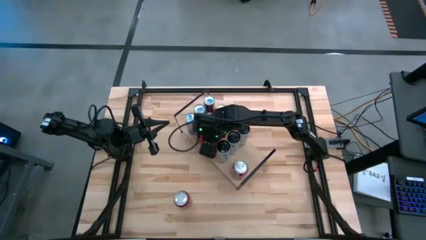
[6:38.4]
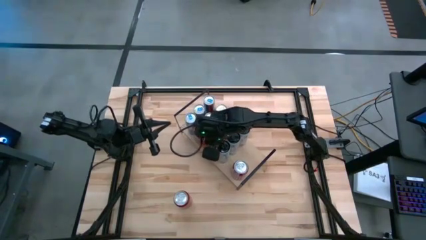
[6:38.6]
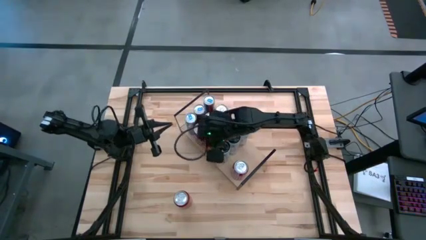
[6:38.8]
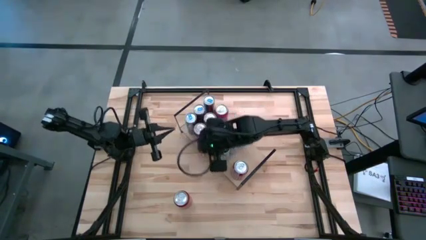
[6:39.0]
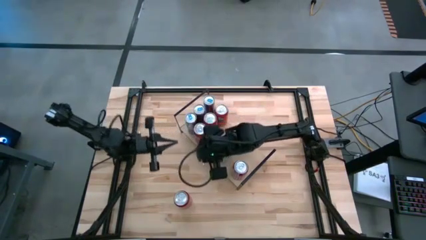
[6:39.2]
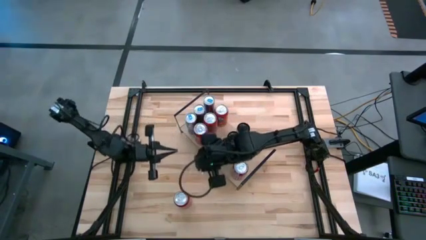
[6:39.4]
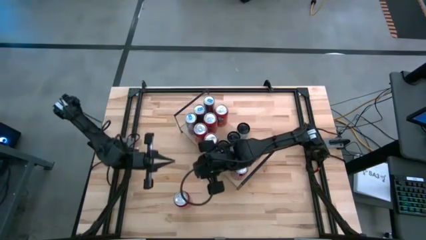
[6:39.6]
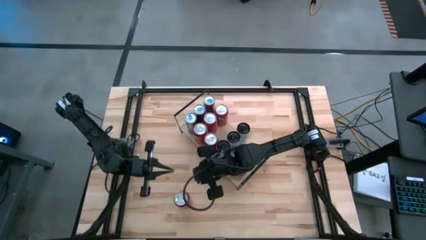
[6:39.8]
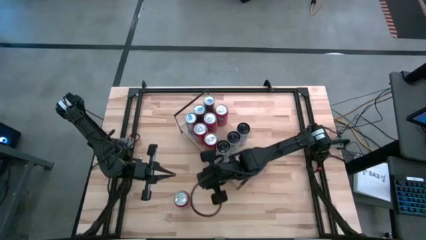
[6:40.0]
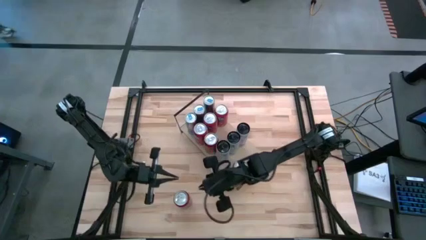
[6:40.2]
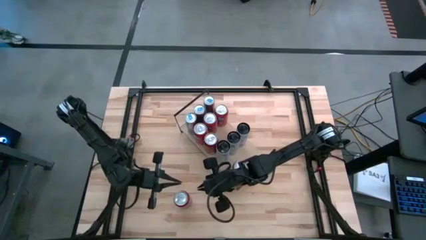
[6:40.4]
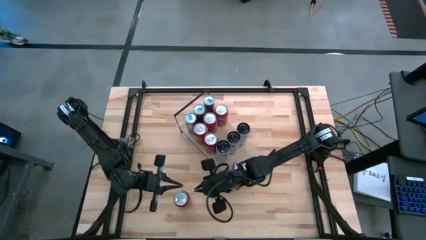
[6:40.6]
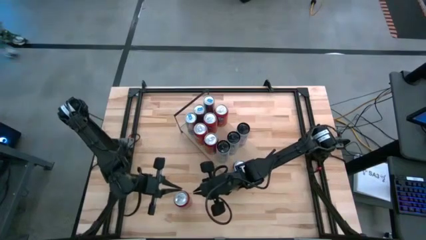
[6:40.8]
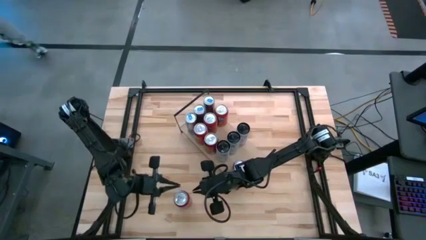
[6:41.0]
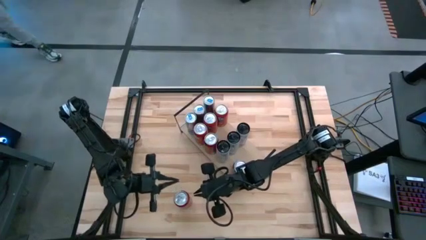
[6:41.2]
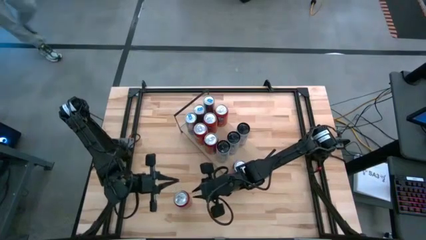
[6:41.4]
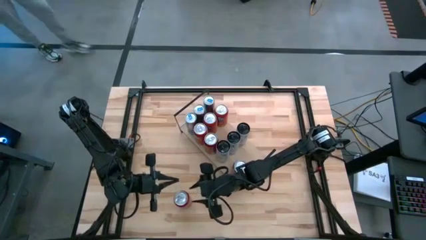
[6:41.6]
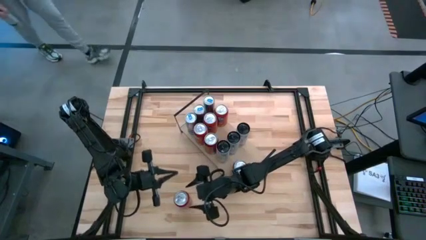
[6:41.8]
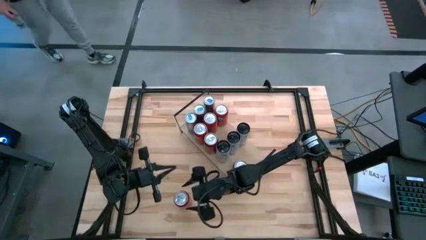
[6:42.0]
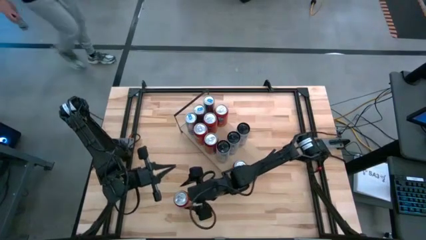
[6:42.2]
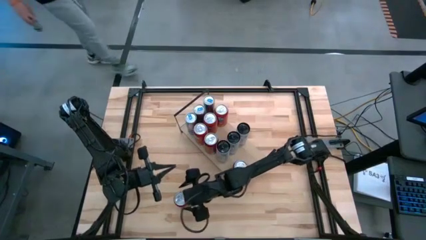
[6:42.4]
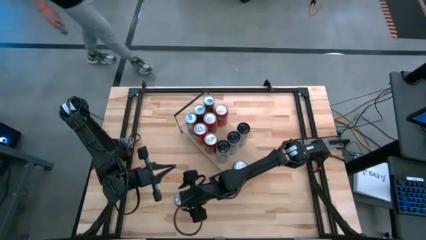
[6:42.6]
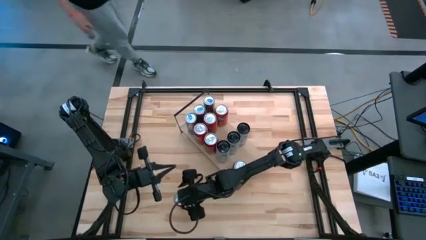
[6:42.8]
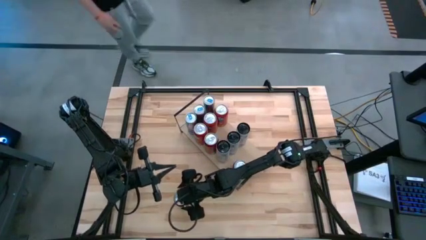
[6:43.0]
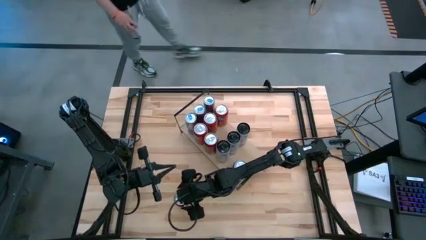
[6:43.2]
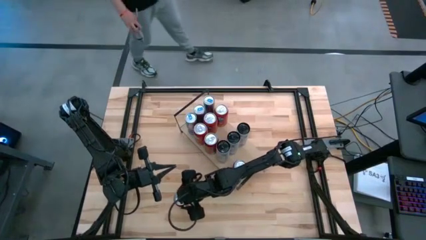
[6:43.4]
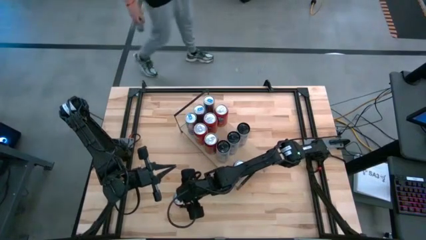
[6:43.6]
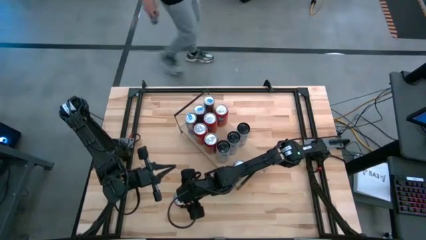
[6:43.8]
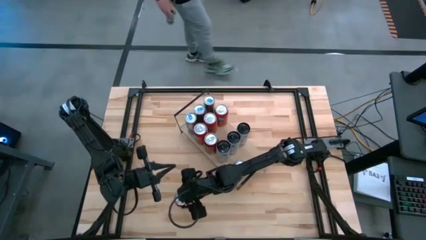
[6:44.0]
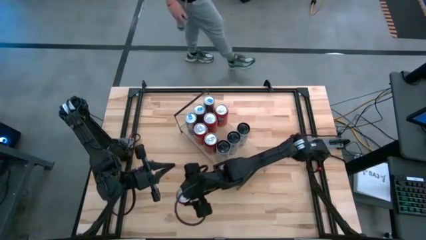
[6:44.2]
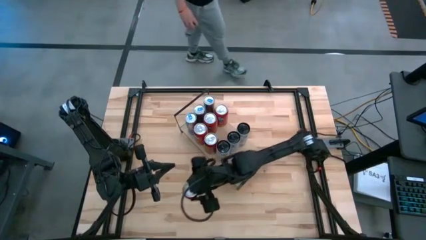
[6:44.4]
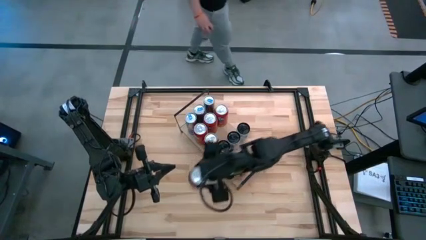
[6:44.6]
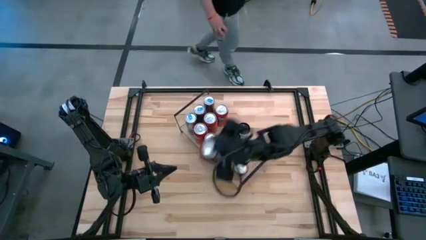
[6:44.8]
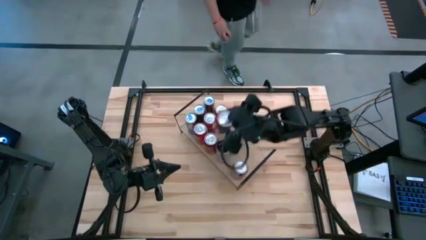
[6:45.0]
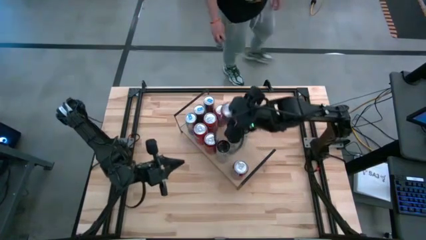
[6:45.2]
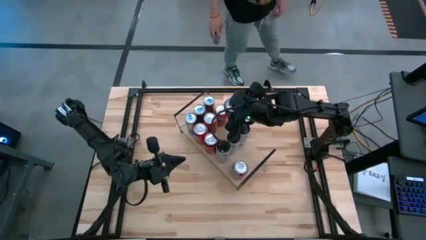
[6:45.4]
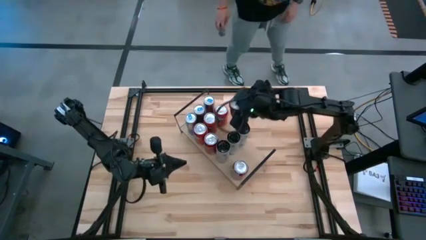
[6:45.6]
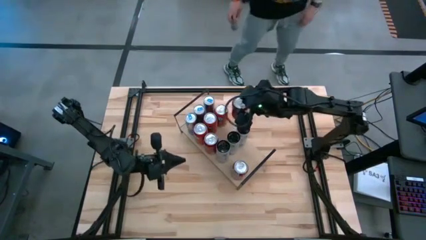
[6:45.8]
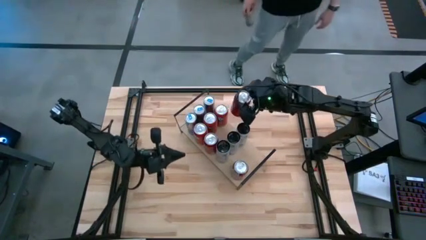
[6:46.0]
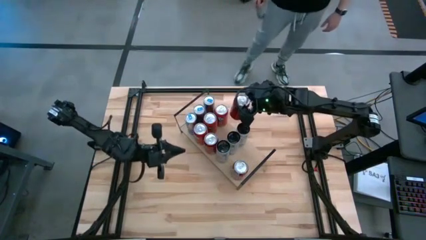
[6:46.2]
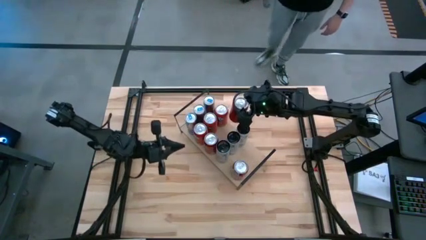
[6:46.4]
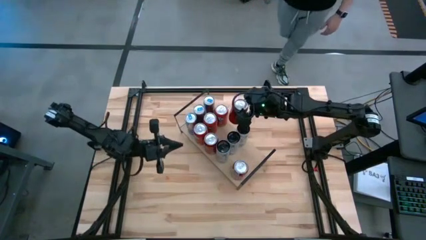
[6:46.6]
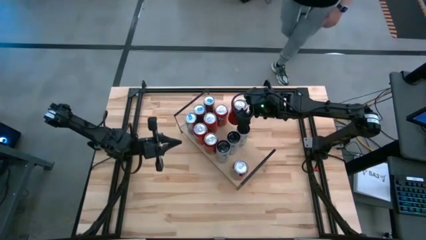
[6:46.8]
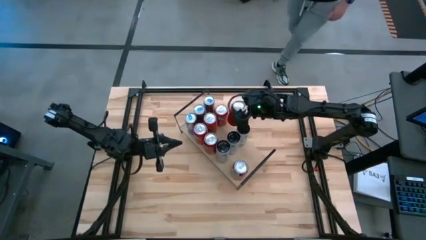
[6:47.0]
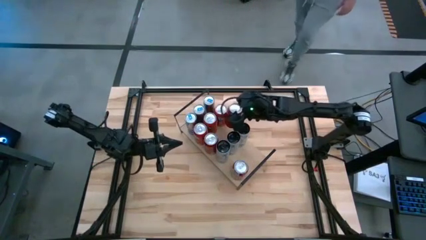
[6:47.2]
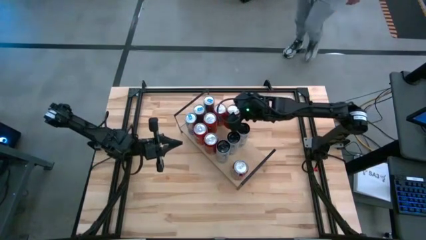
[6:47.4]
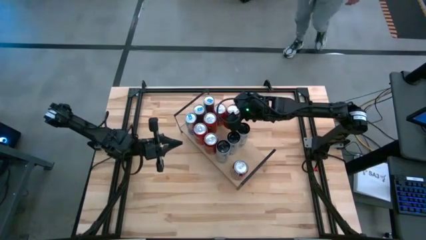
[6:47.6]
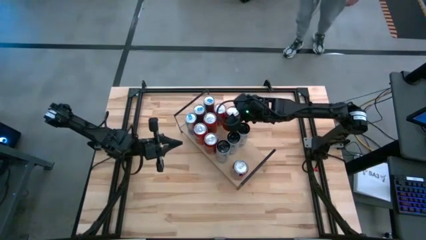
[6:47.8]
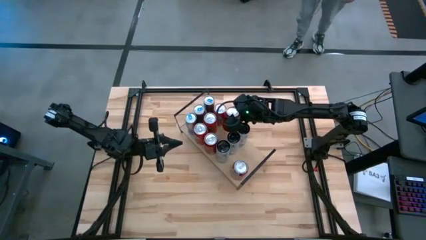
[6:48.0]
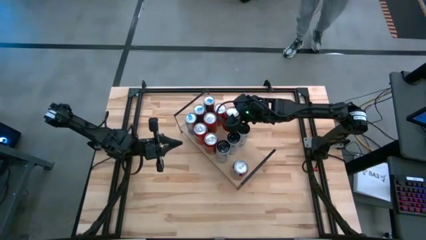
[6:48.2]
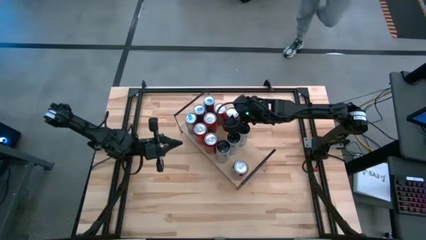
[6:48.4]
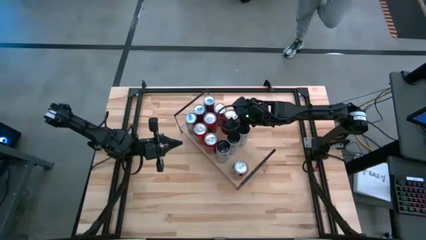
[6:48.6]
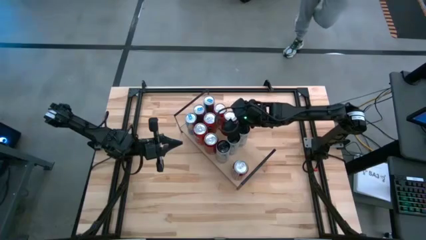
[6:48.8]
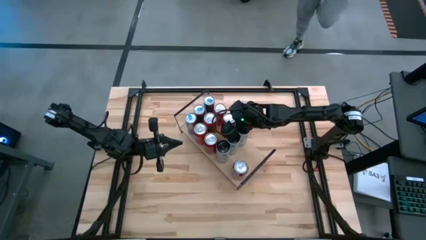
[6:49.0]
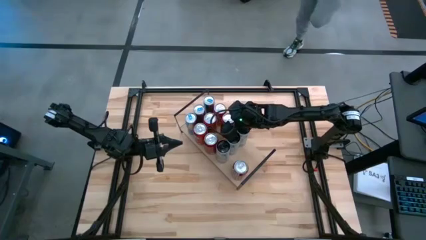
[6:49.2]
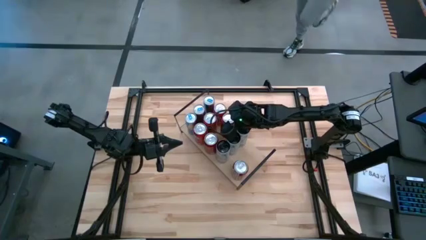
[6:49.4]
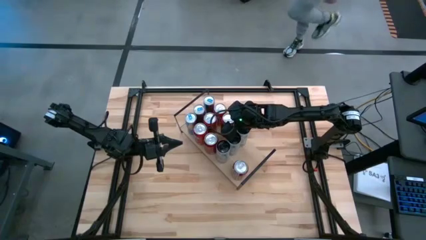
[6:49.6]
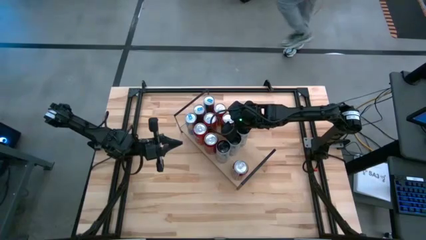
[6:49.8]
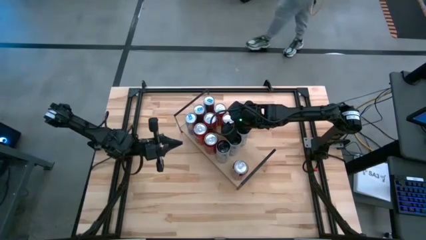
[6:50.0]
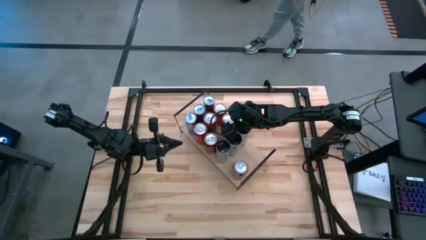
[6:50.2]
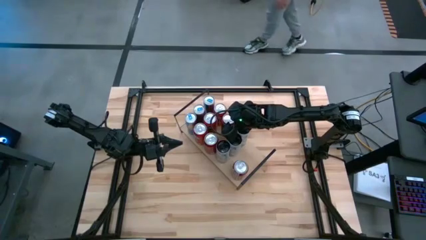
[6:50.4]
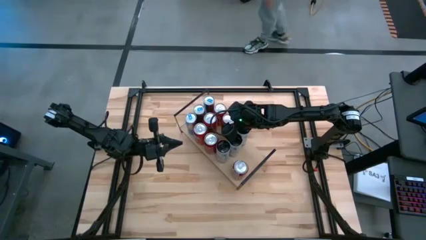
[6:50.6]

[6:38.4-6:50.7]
Task: Place canned beverage on shelf
Put the red soda can on the shelf aligned with the red soda can on the shelf

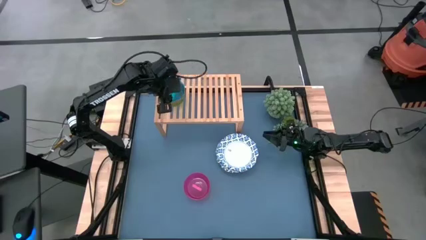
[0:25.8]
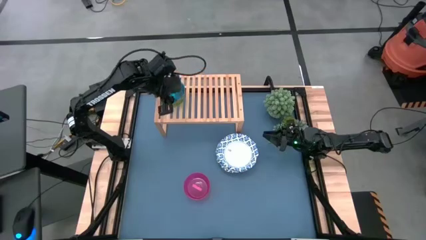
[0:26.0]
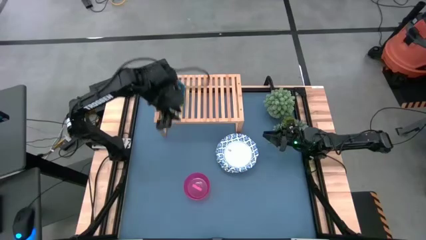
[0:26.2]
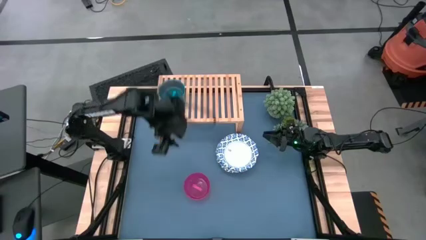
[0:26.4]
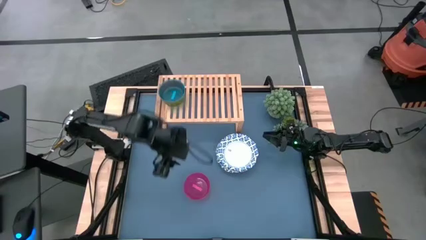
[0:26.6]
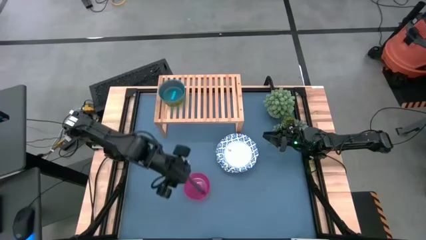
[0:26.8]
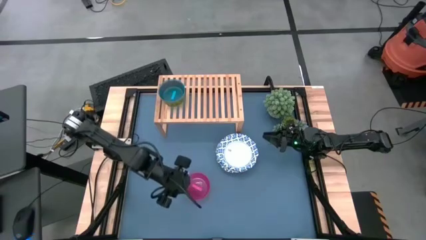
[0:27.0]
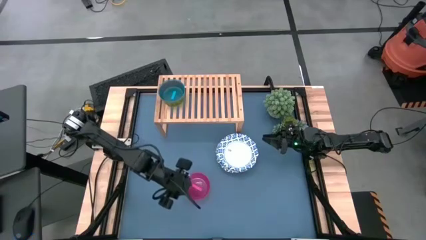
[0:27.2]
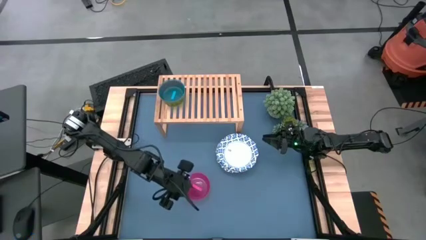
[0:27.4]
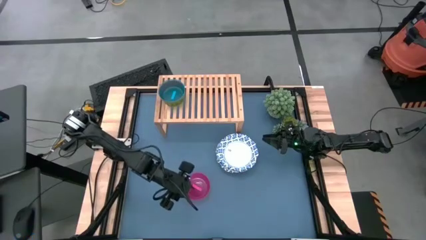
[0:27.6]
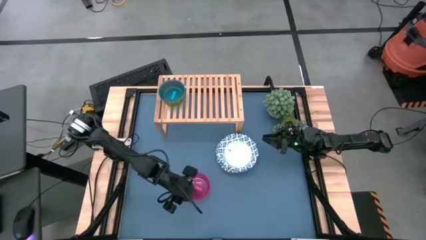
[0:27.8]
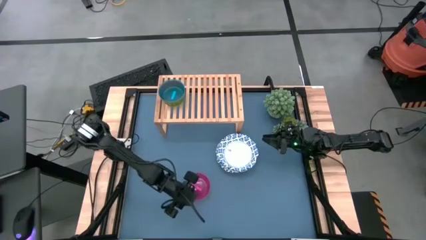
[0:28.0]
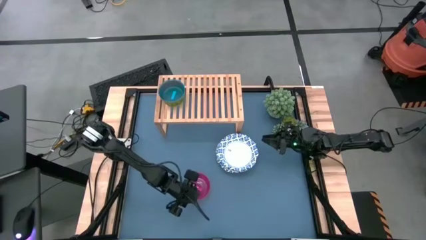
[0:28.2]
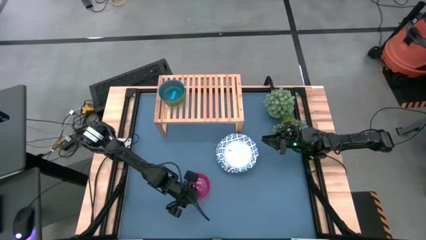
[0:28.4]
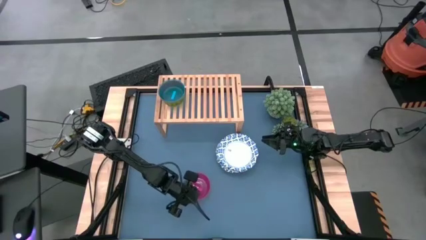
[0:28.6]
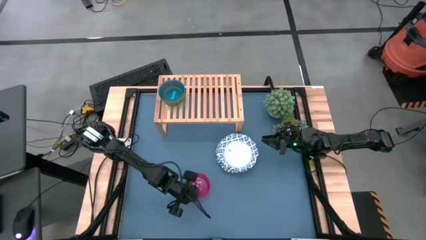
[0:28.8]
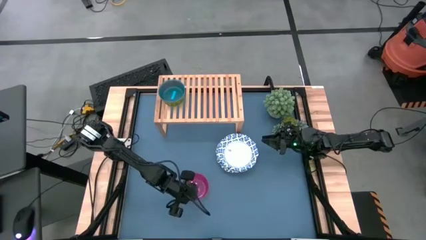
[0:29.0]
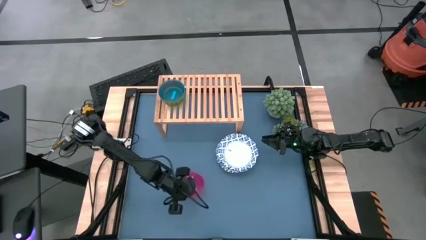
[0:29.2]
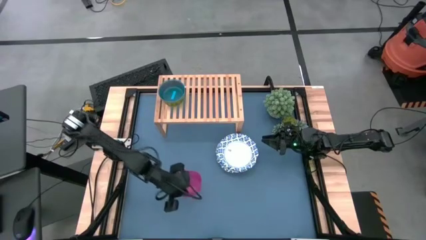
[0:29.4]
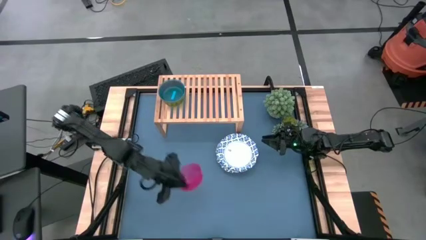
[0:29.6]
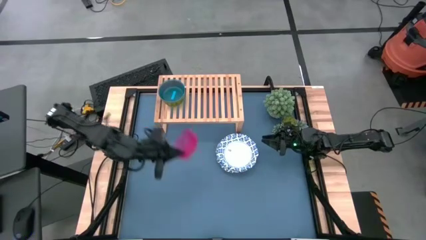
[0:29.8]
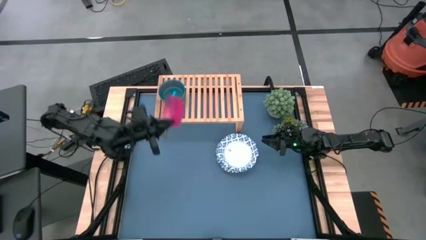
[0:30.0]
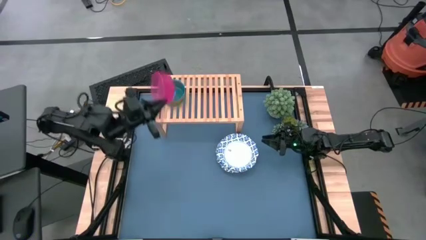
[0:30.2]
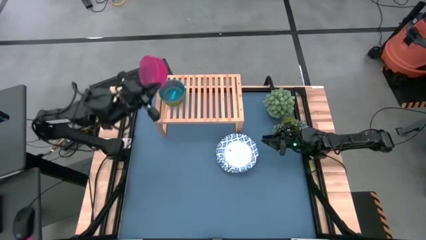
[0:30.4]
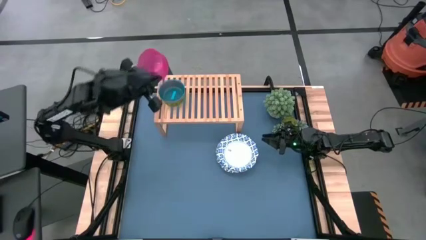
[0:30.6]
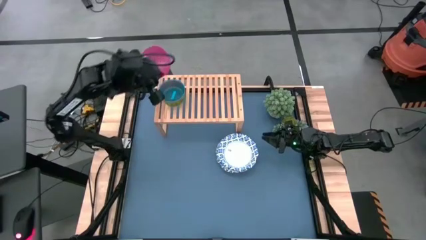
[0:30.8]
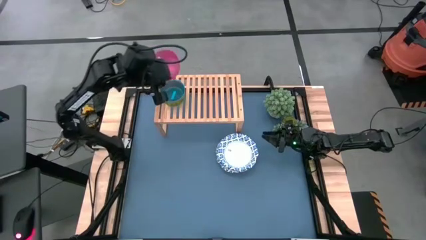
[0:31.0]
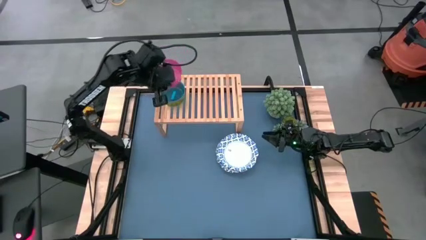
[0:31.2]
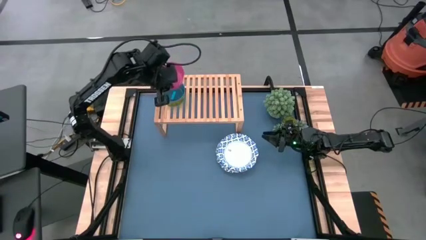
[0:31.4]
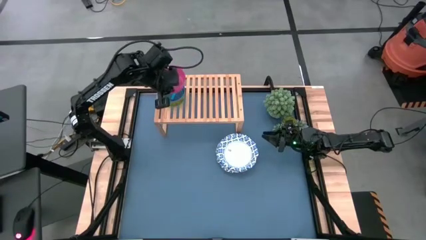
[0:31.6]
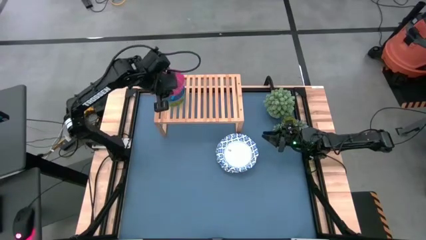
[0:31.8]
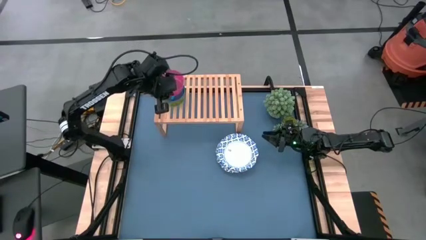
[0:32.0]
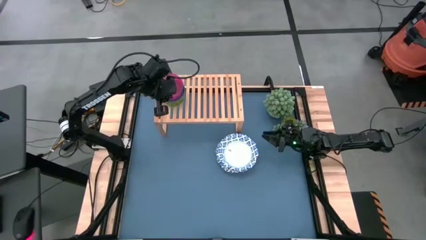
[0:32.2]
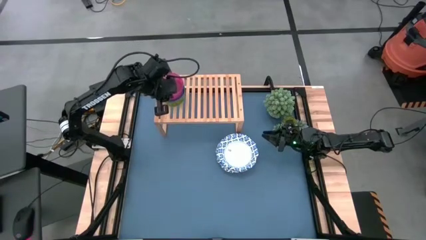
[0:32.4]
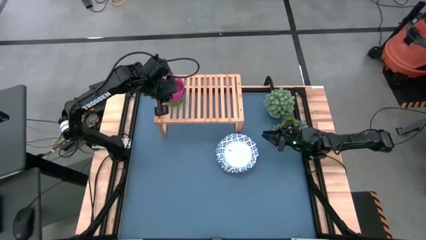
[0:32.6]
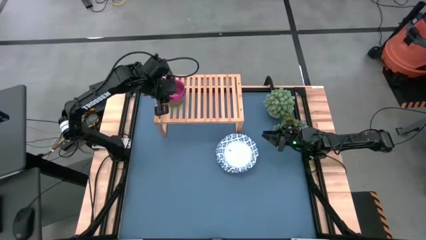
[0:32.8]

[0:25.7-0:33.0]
Task: Place and stack bowls onto a shelf
Stack the pink bowl on top of the blue bowl on the shelf
